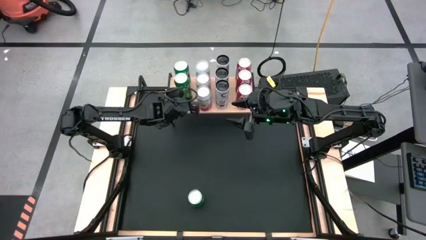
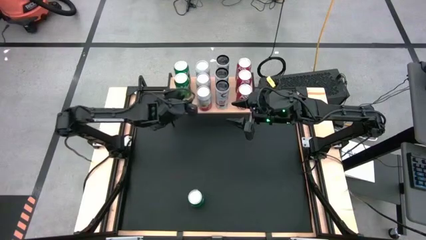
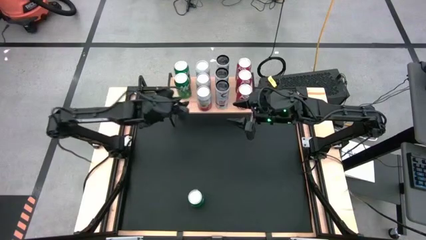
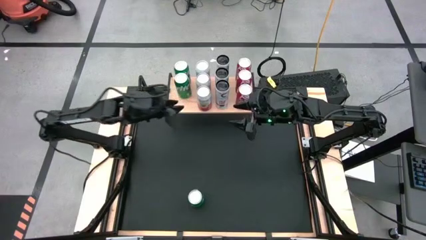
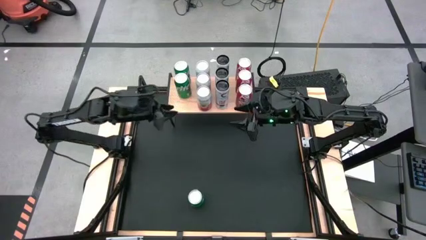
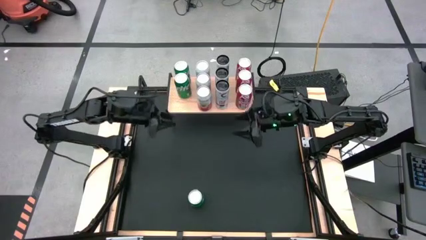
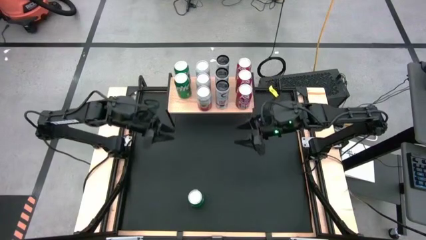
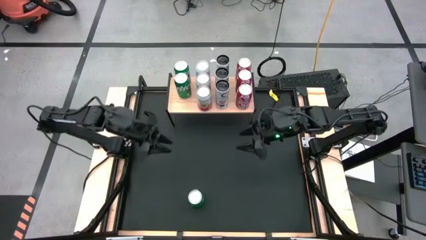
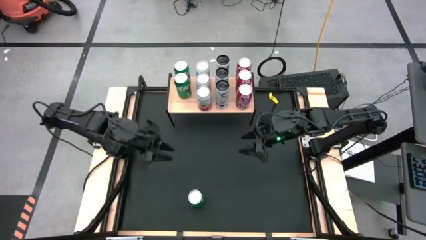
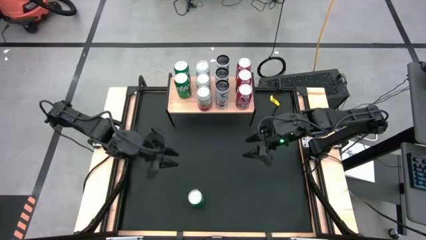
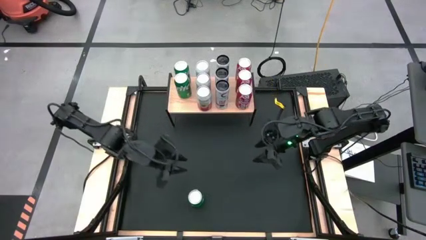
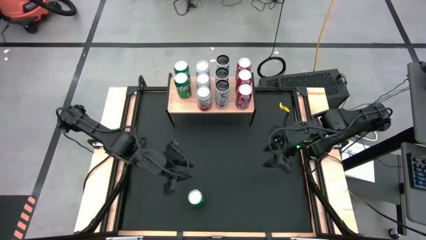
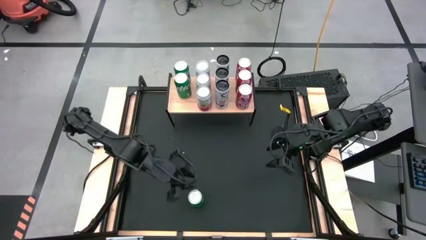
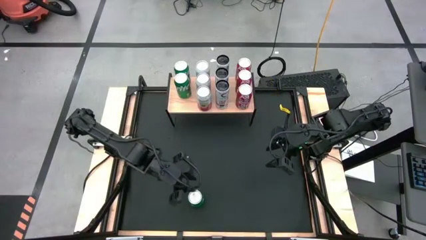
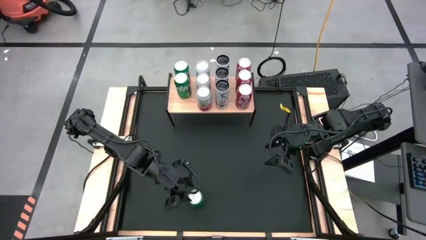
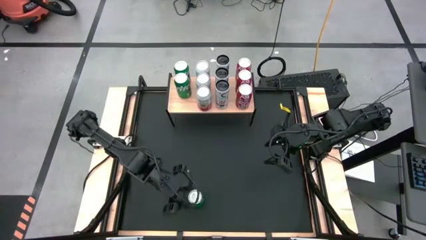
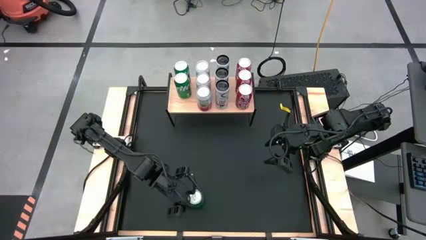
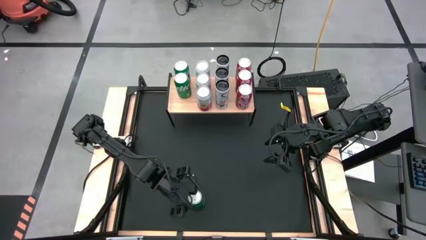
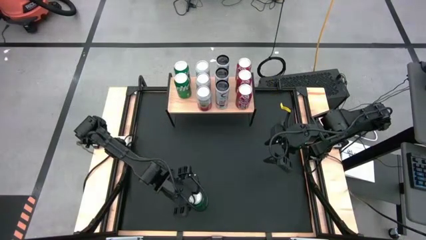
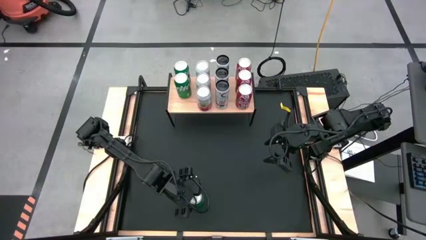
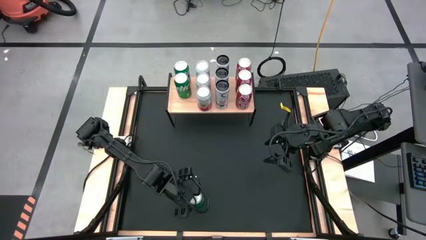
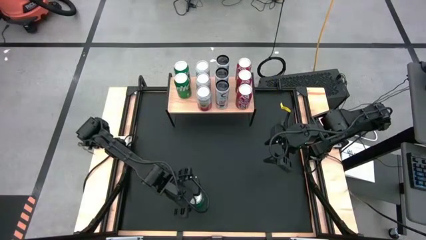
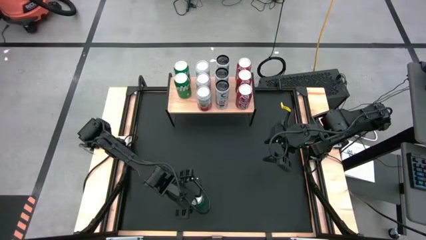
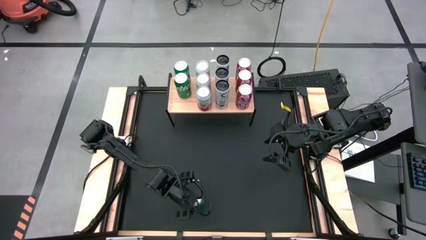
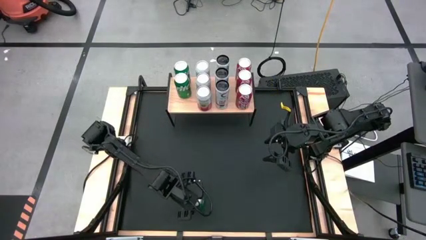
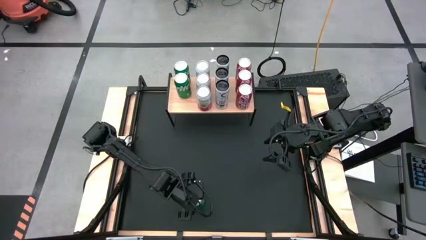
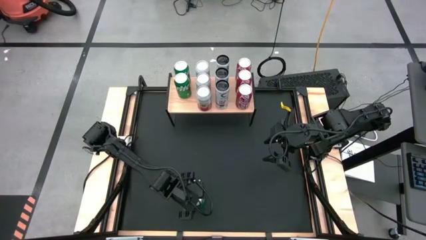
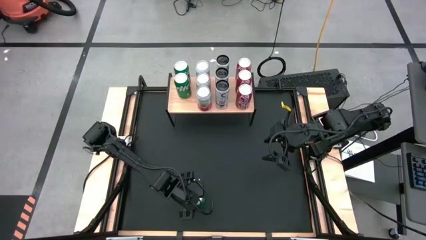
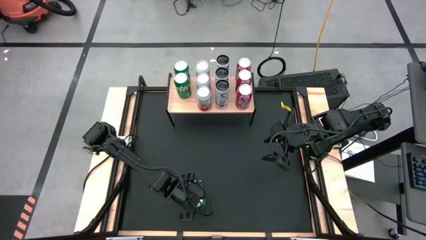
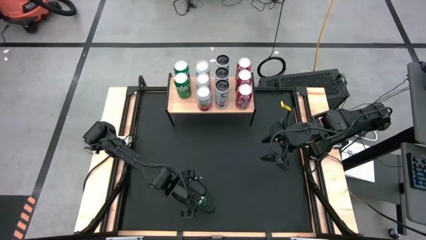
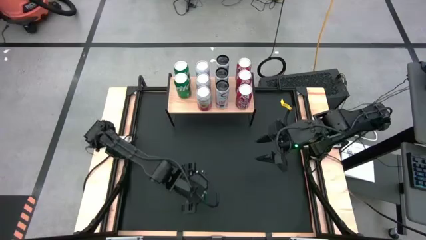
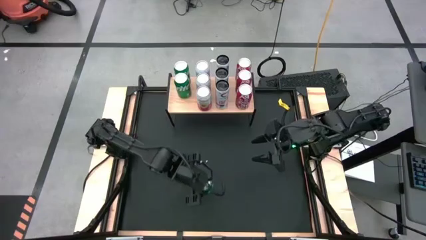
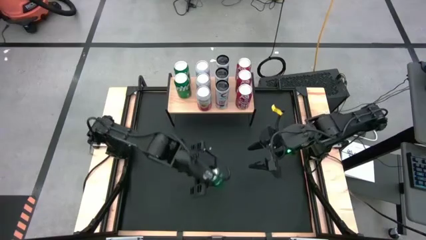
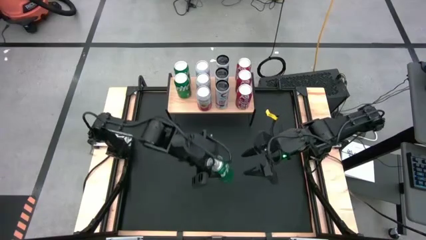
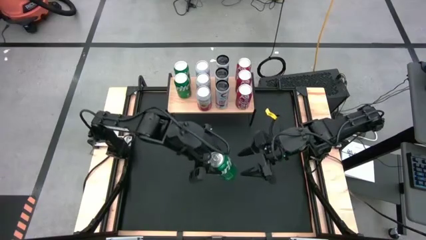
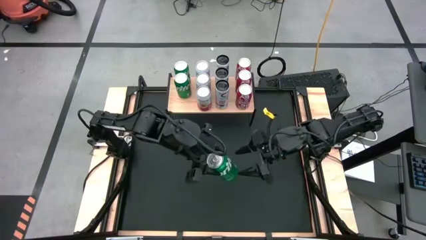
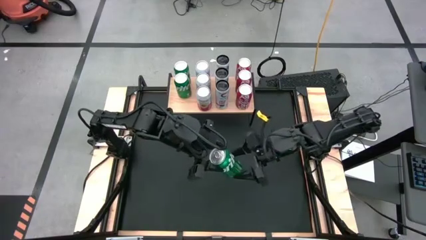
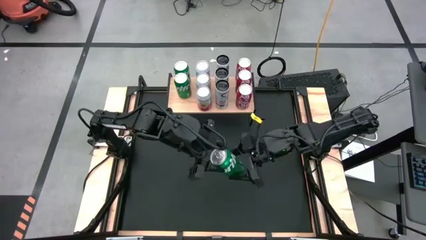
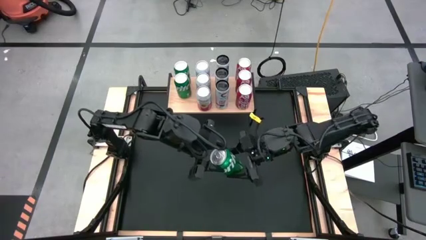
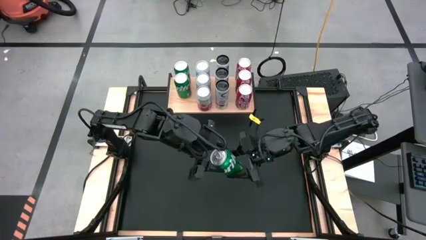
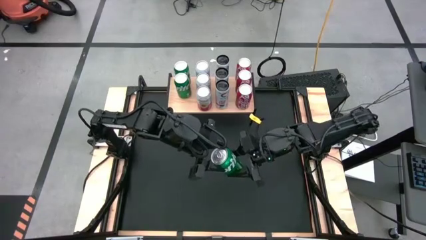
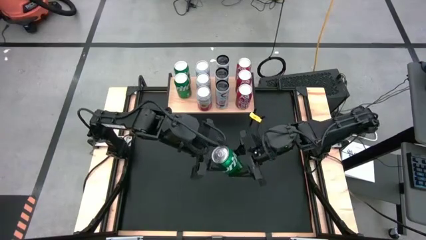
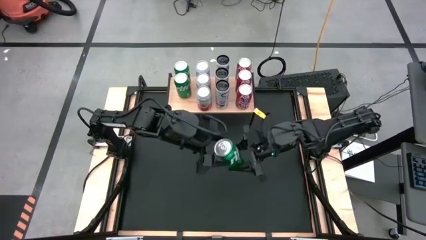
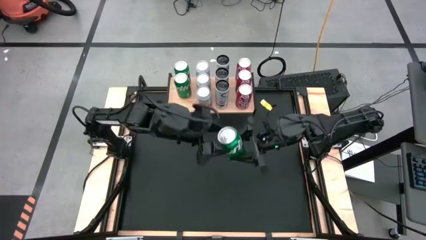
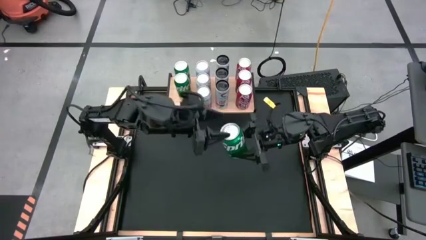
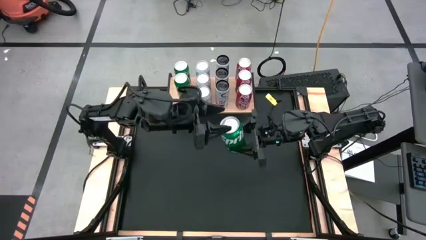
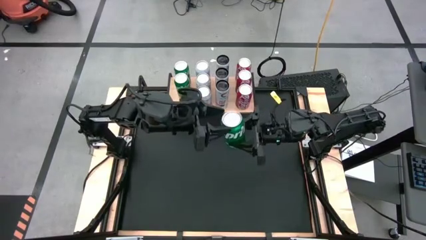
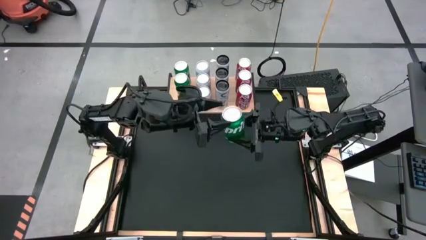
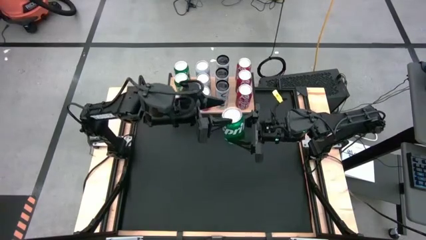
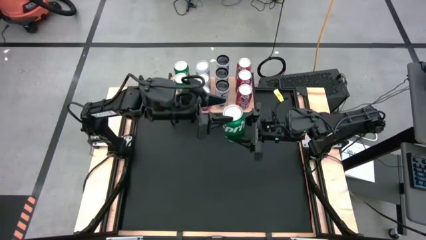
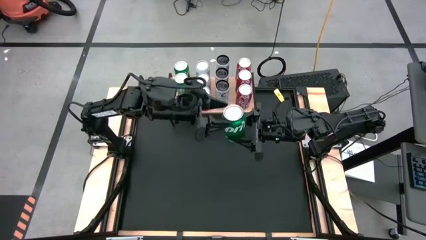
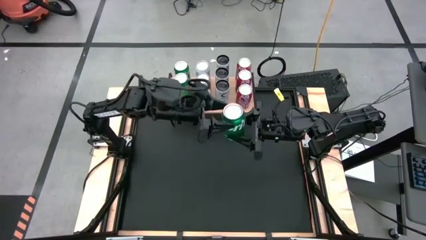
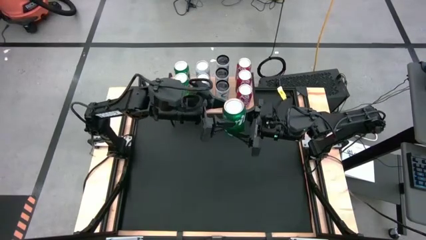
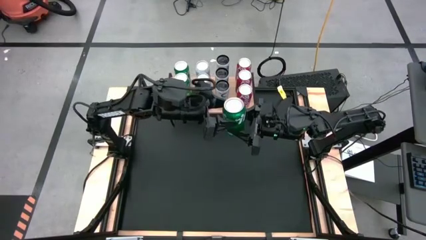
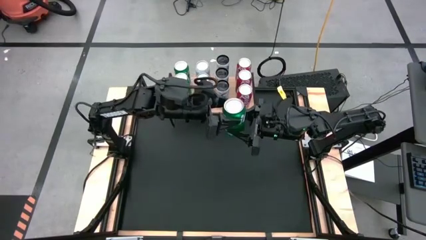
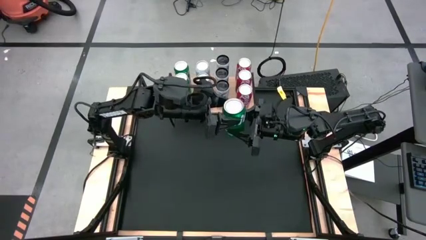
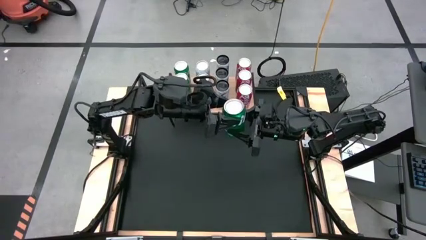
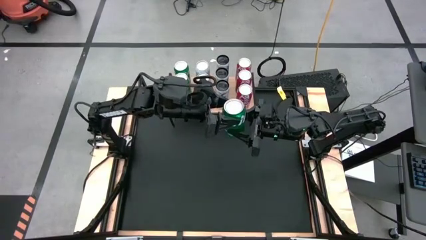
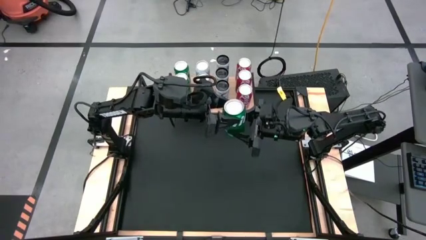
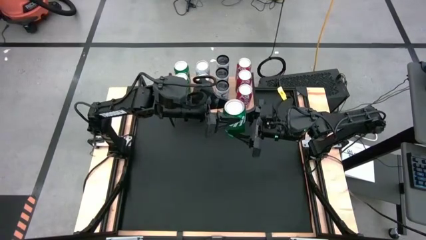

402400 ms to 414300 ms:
Task: Place canned beverage on shelf
Put the green soda can aligned with the other green soda cans on the shelf

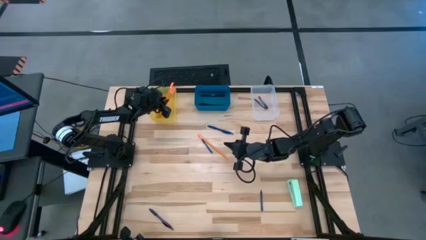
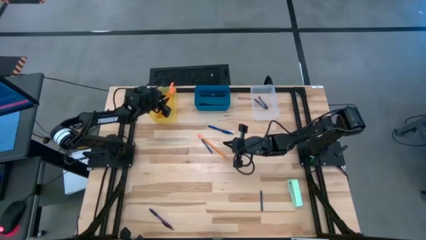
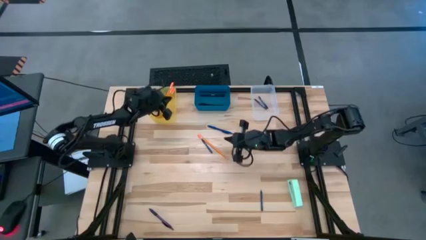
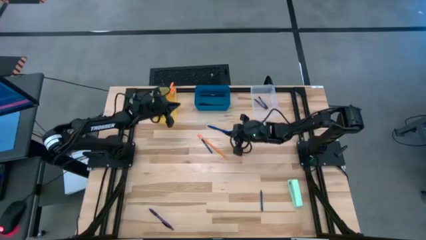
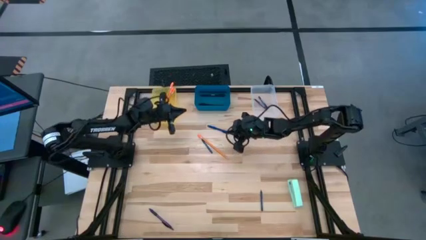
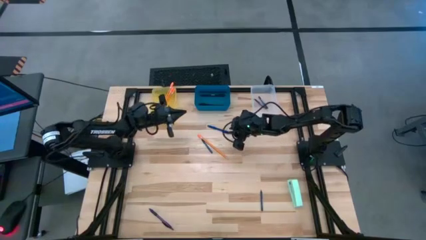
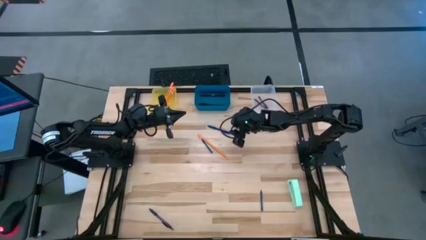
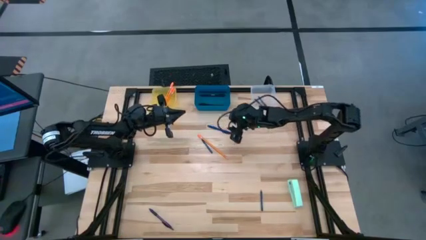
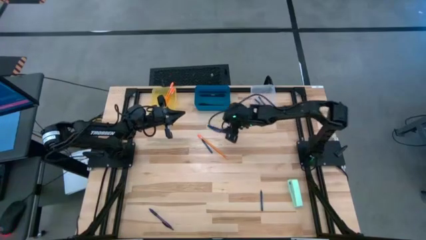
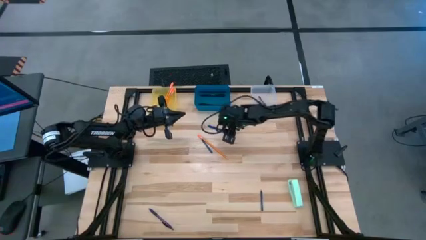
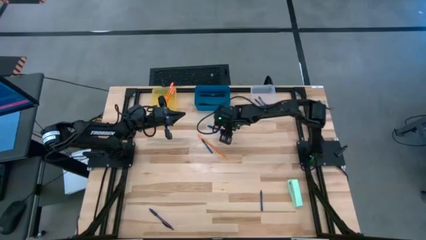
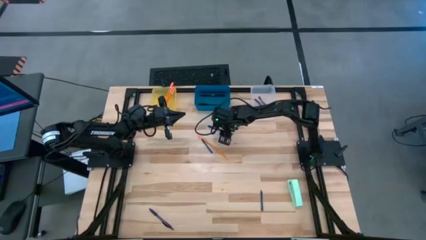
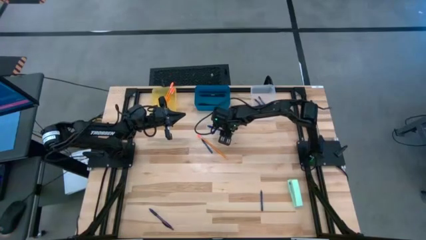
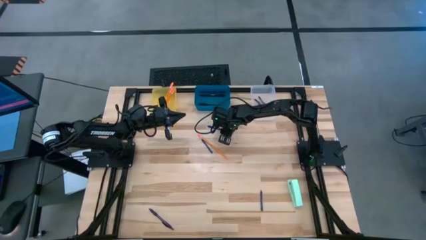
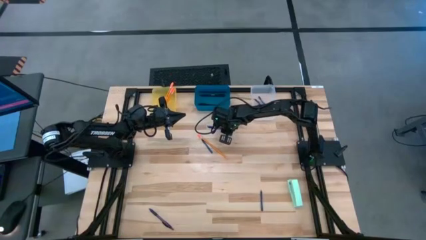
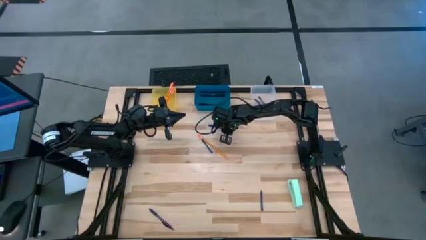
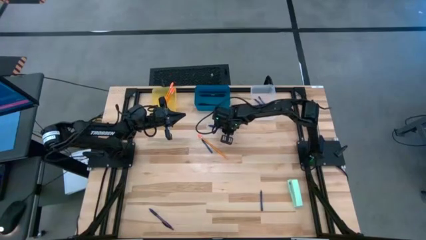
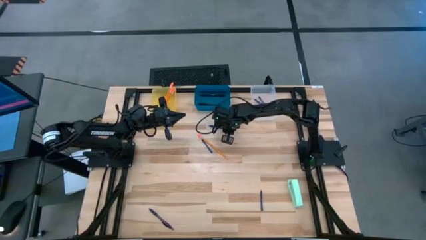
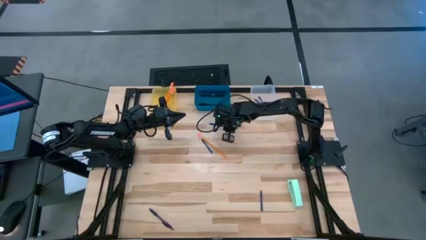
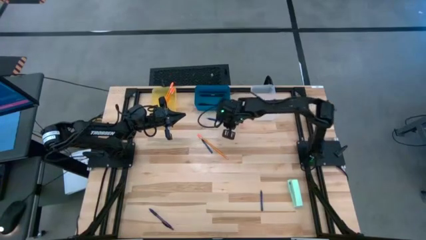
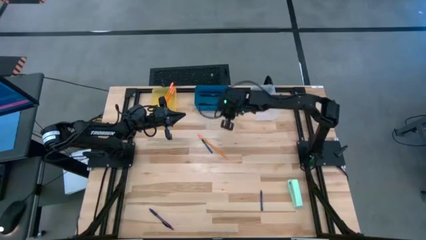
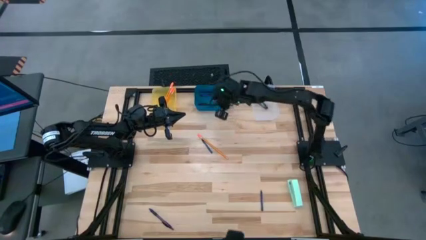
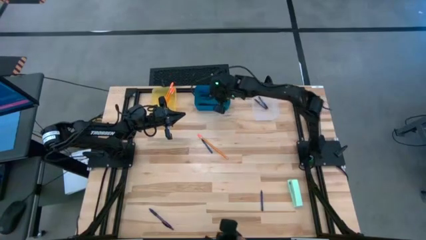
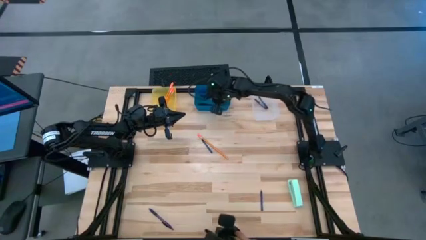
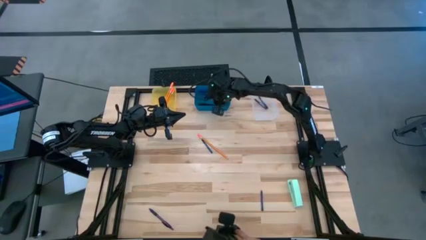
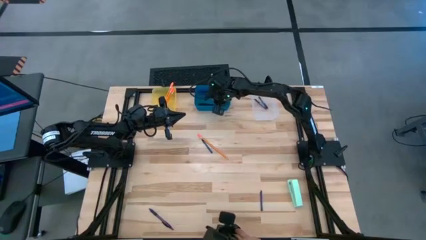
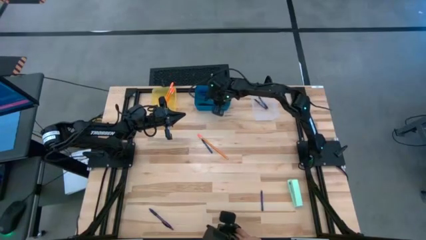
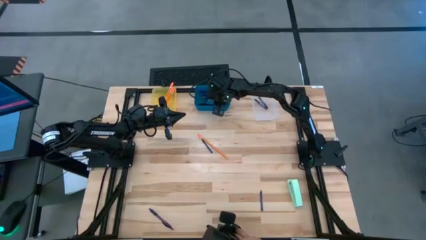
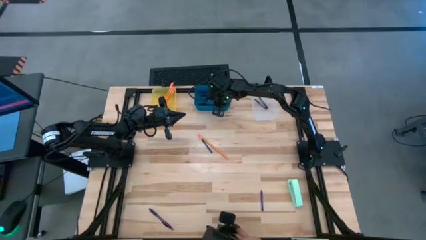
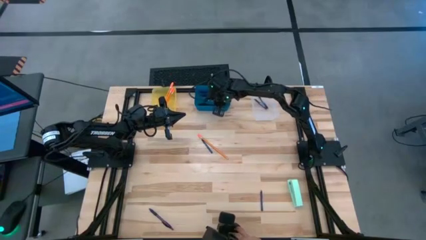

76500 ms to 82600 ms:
Task: Sort crayons/erasers/pens/pencils in bins
Put the blue pen into the transparent blue bin
